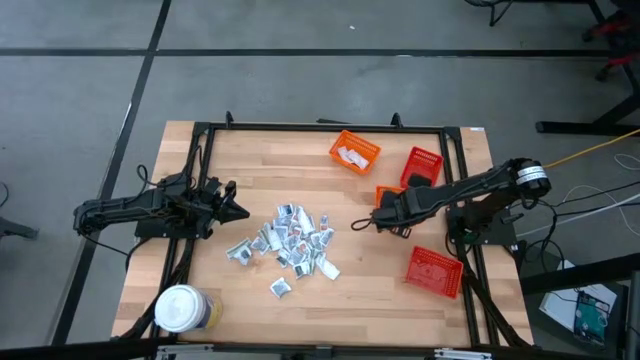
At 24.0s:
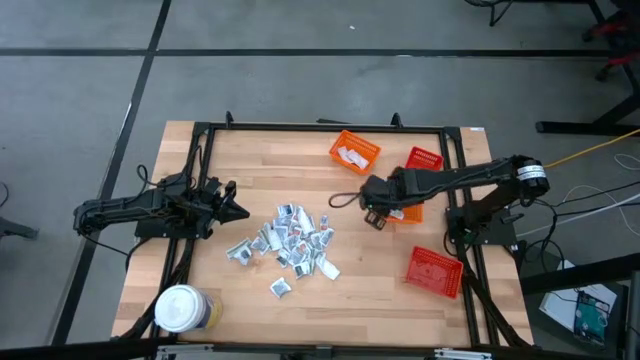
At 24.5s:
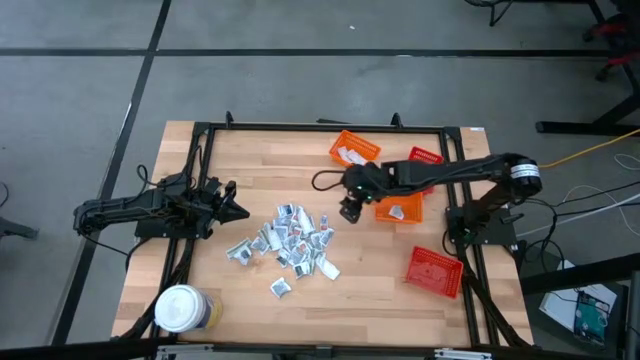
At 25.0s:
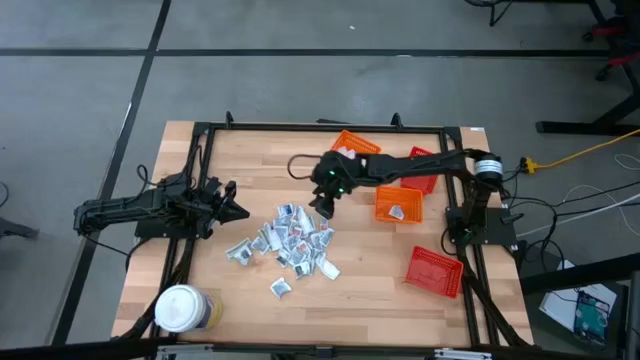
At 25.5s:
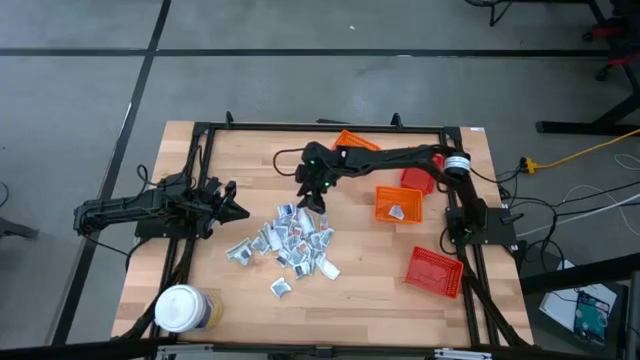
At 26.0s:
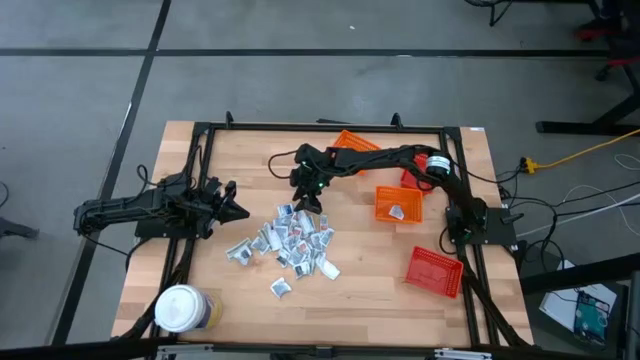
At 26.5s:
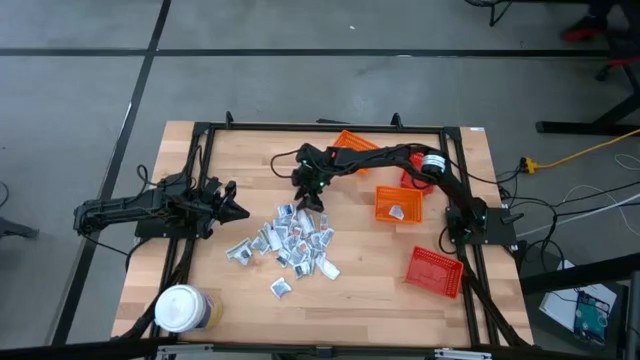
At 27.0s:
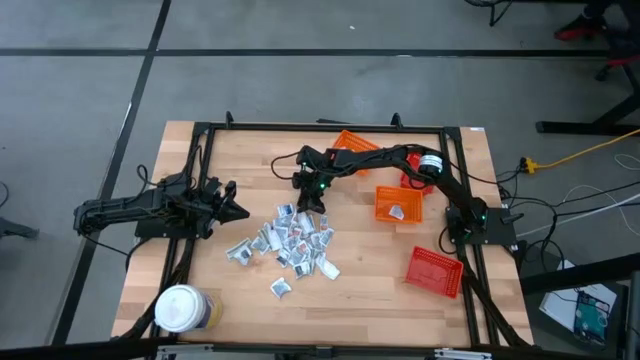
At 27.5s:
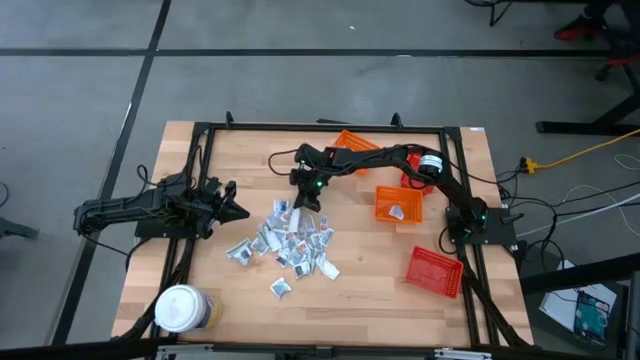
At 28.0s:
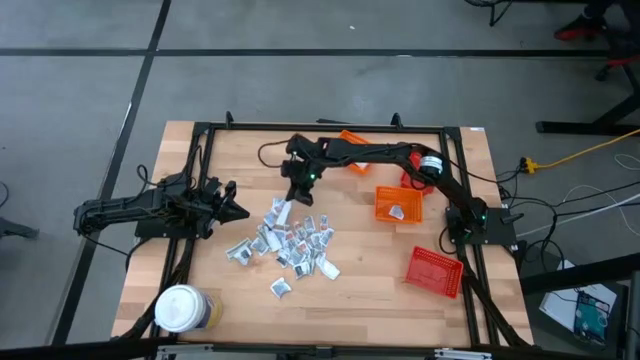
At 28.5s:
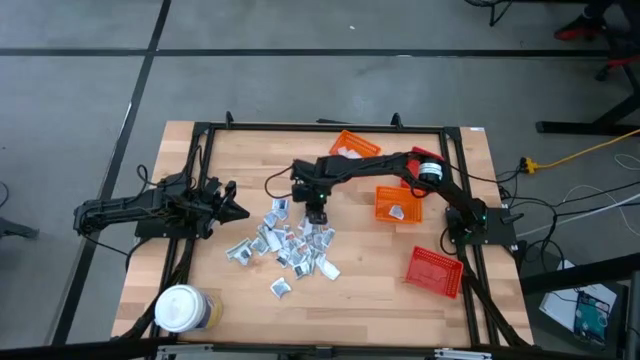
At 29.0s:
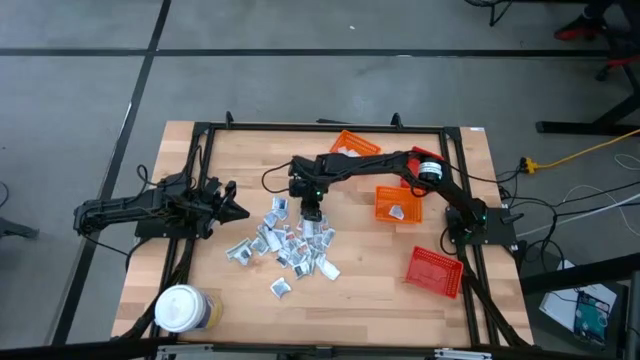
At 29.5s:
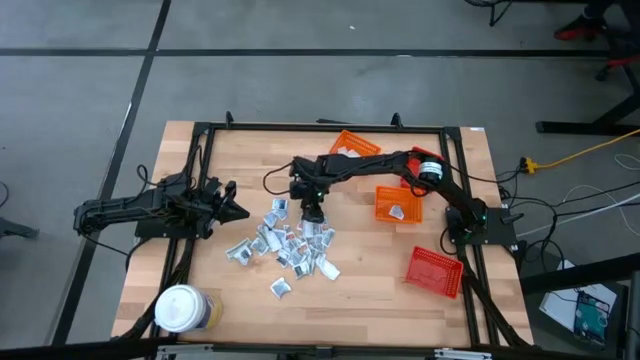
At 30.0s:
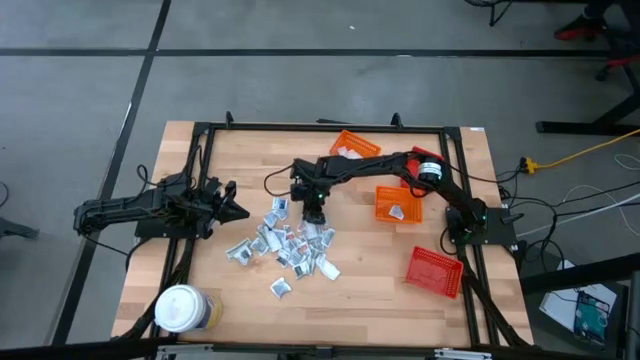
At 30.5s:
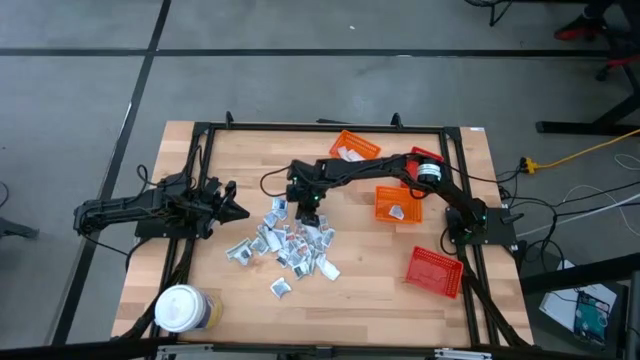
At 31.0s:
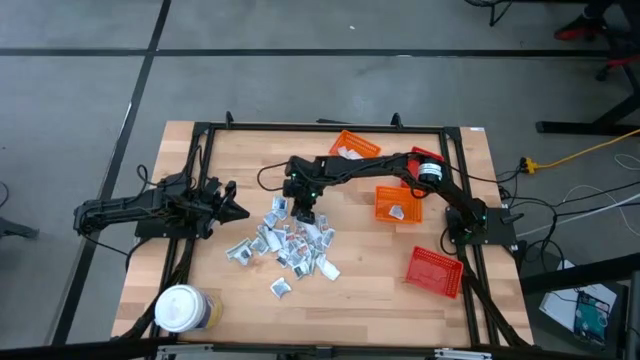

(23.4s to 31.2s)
Task: Pick & Place First Aid Supplies
Put the orange ointment pack into the top red bin

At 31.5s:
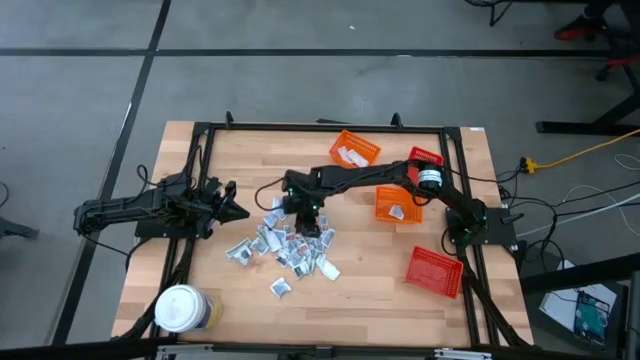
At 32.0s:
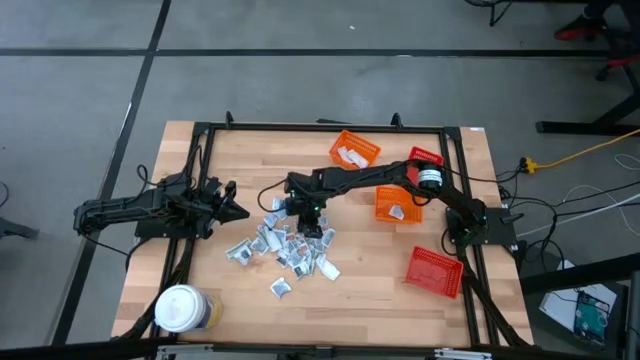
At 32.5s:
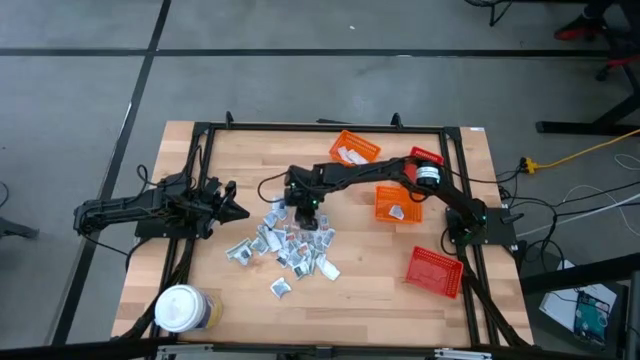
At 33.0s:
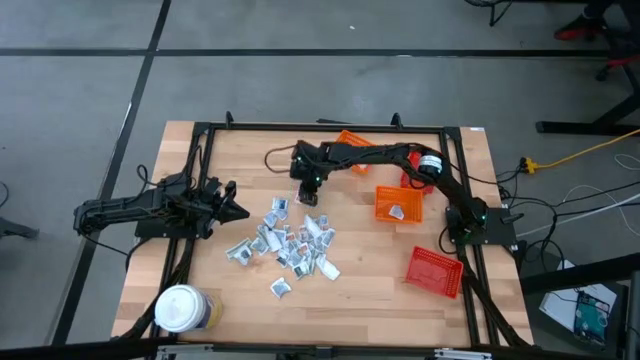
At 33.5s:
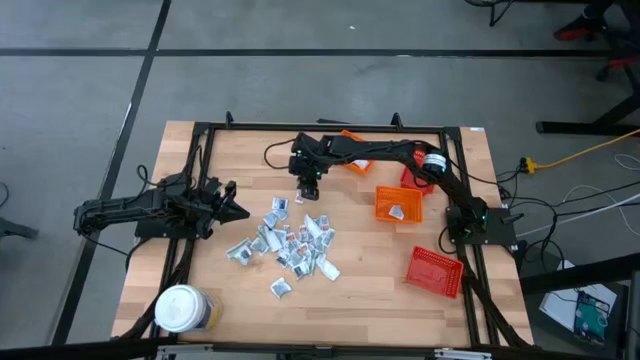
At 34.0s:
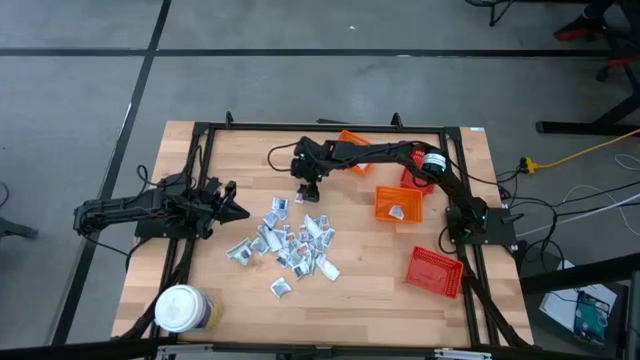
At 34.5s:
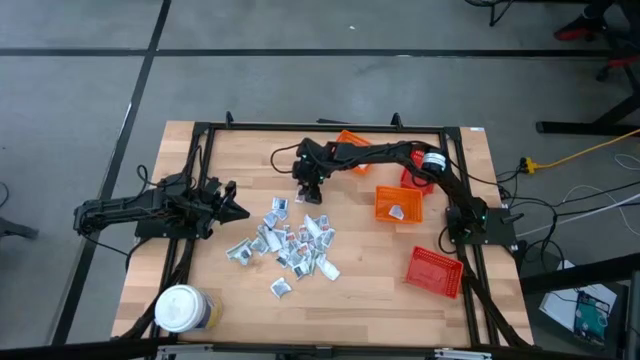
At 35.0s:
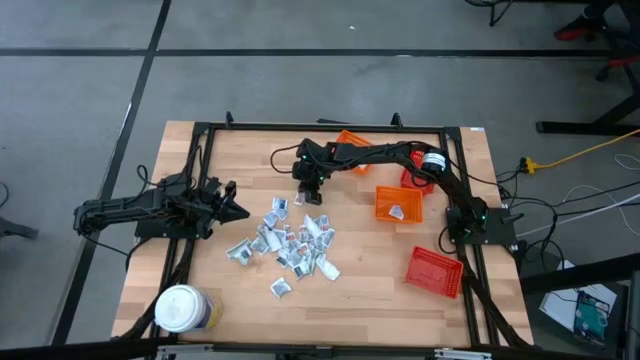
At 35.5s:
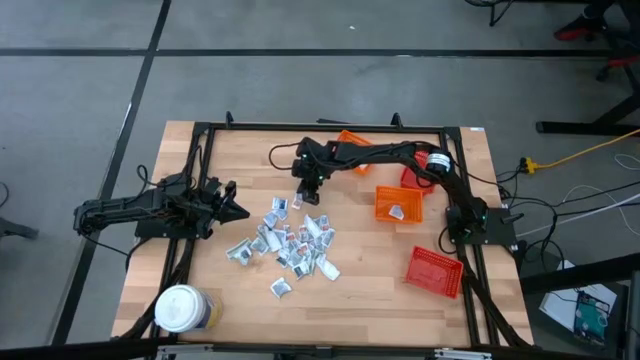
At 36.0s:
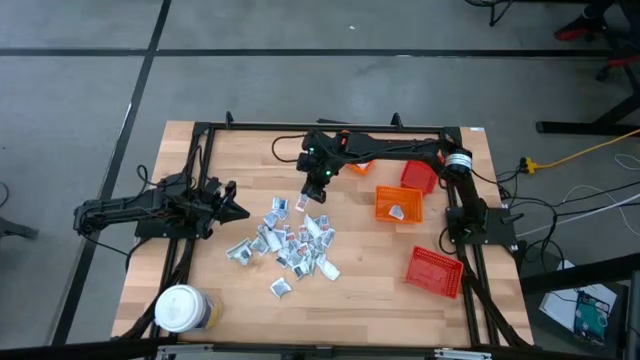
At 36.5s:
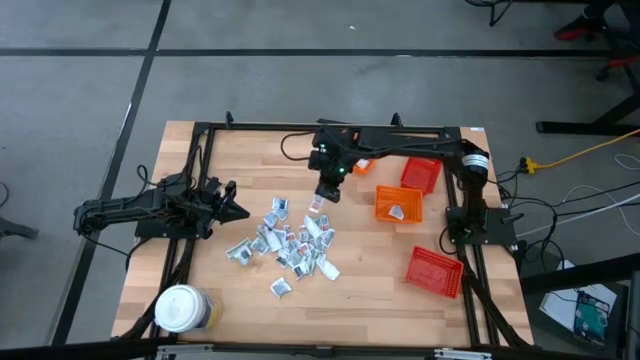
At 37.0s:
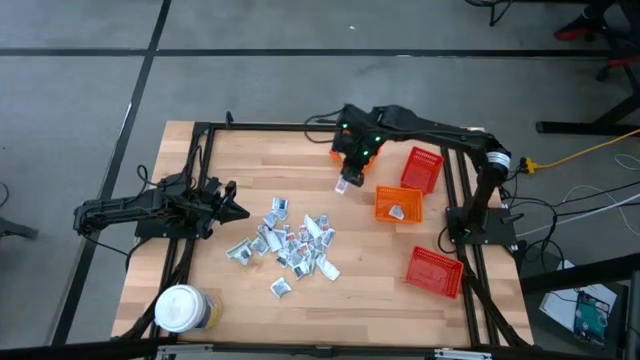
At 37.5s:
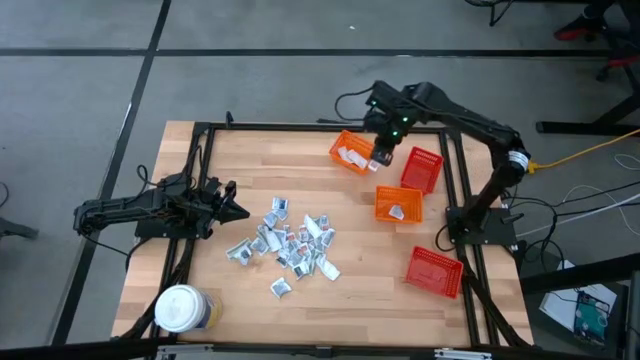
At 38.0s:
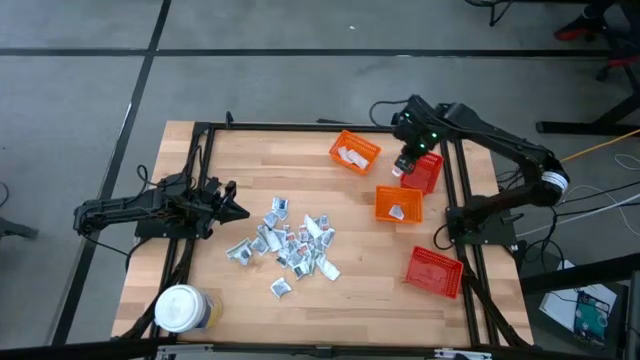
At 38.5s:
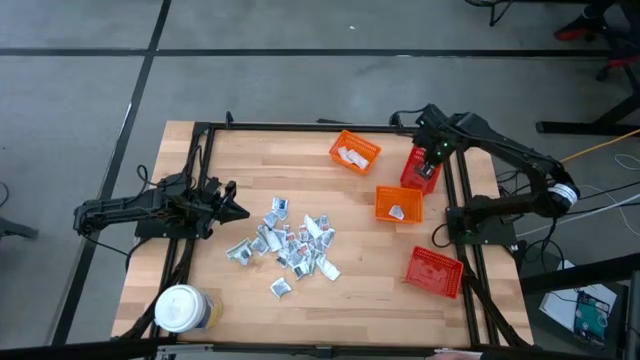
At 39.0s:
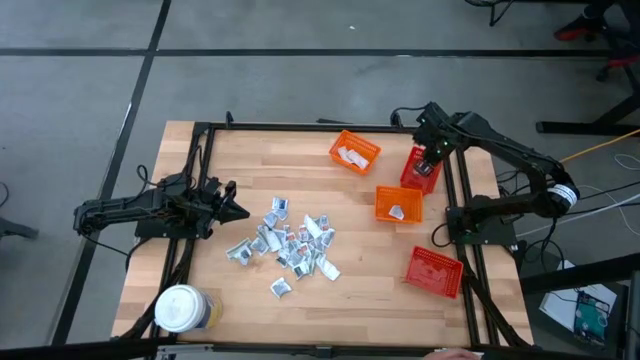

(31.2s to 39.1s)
Put the orange ointment pack into the top red bin

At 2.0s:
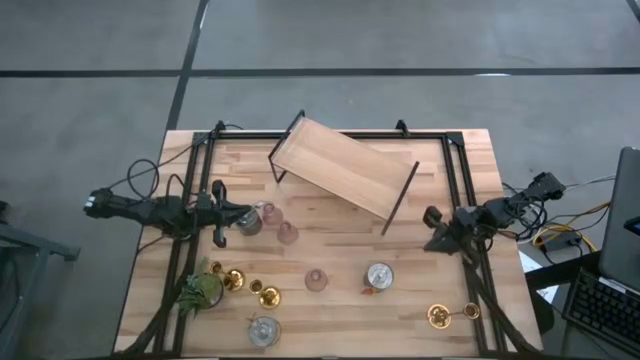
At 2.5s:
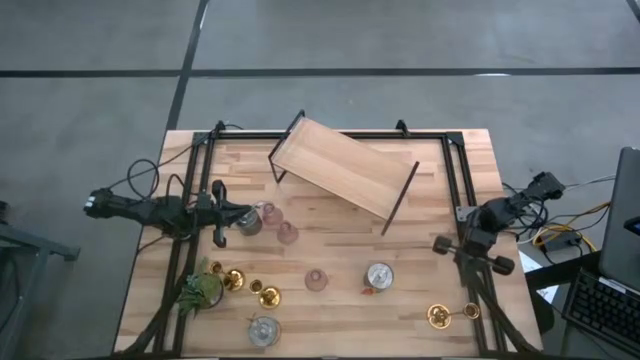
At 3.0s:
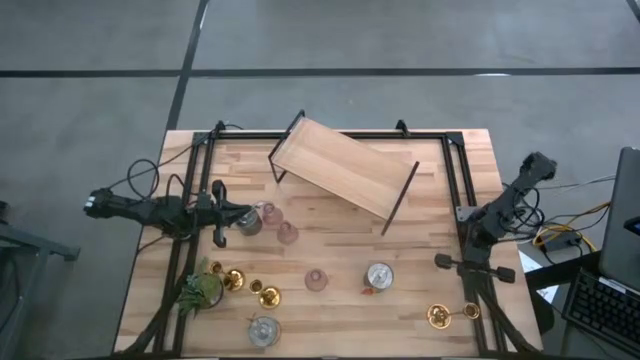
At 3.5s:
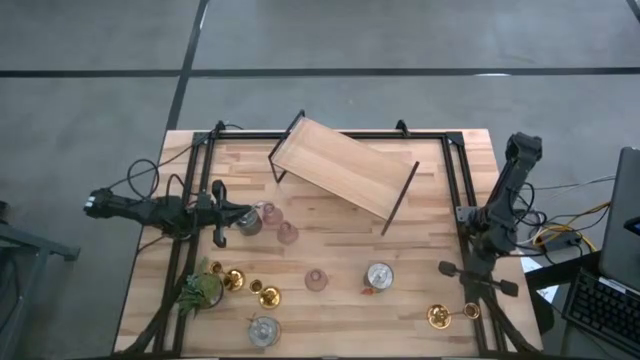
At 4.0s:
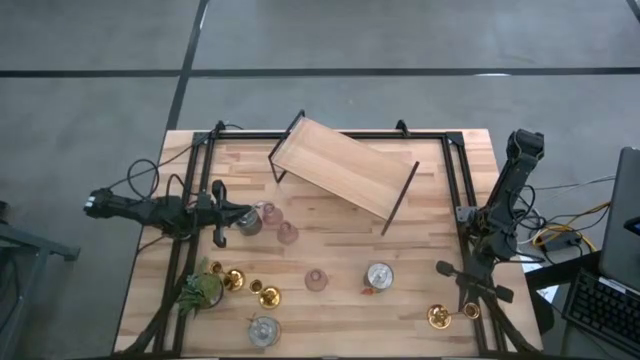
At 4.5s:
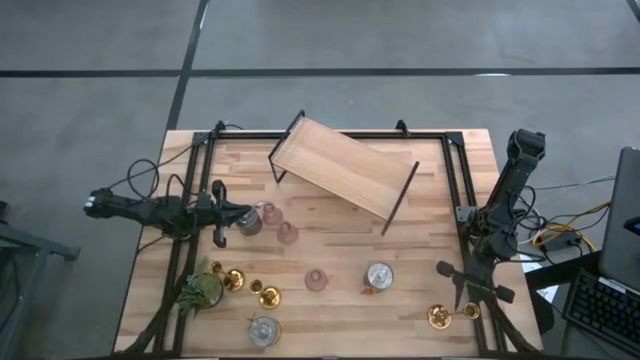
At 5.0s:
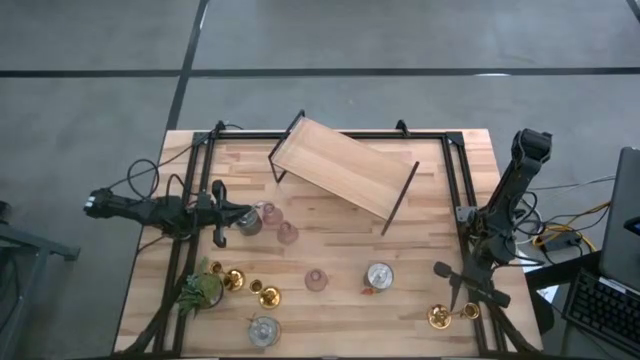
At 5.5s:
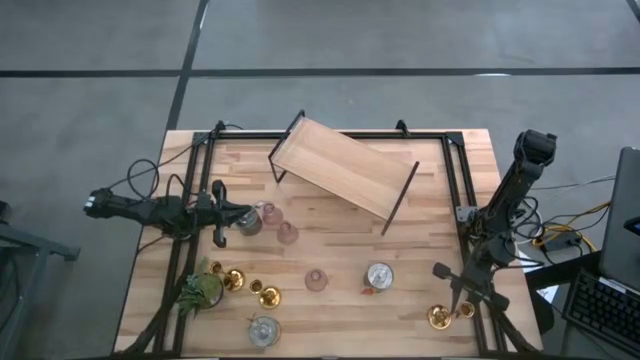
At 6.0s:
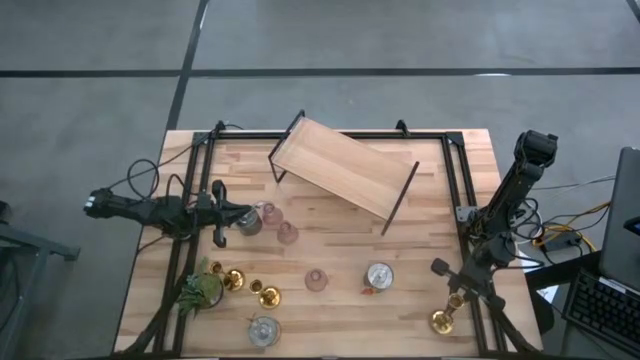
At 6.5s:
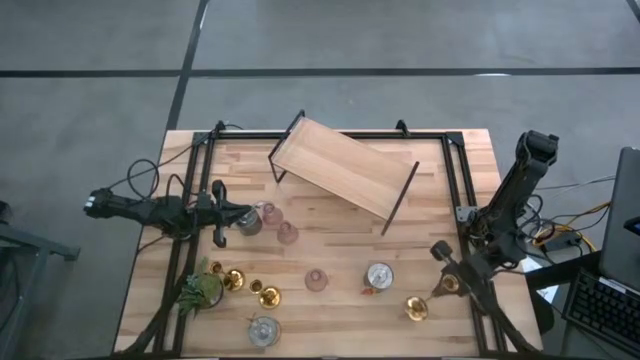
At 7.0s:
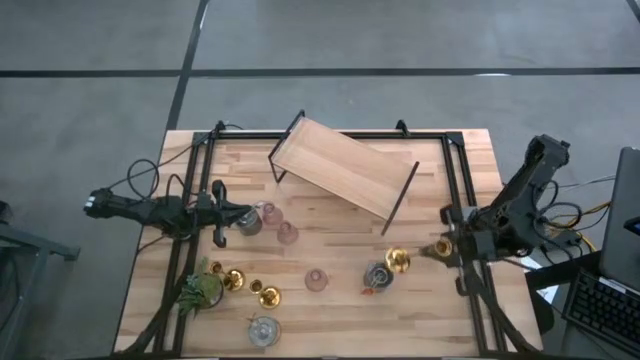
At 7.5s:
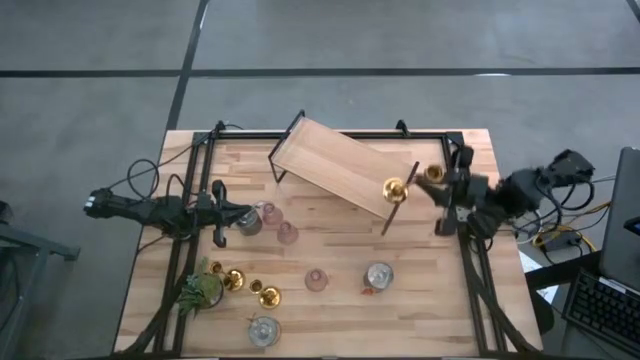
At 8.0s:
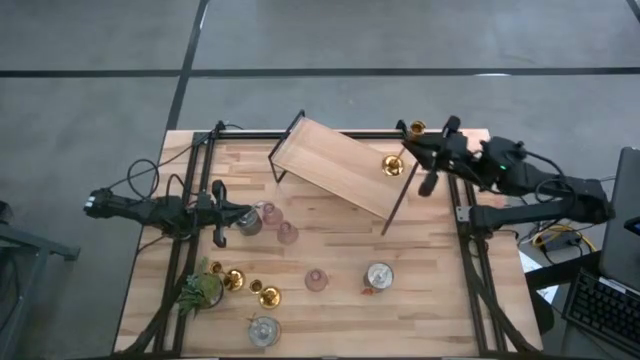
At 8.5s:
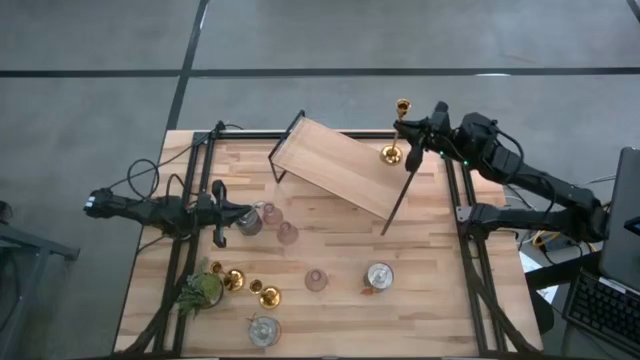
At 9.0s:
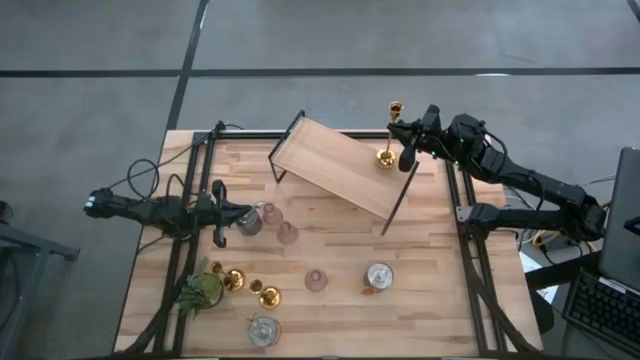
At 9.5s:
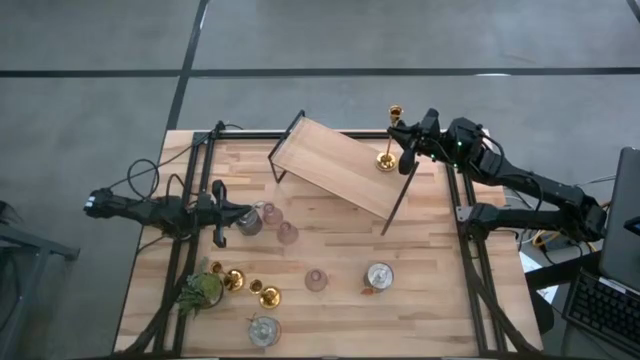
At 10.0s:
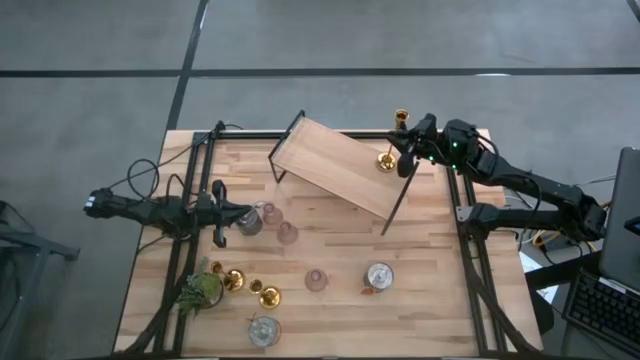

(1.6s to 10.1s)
Task: Pick & Place candle stick holders
Put the right gold candle holder on the shelf
